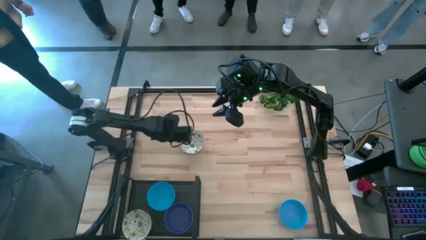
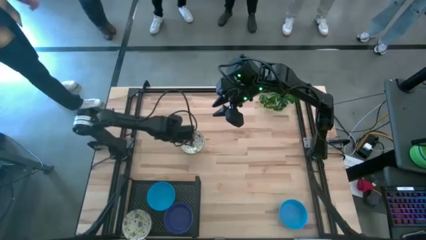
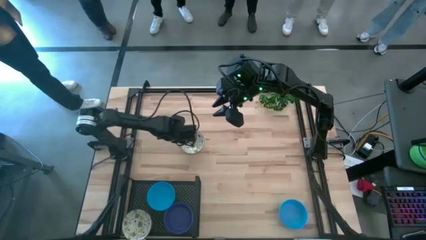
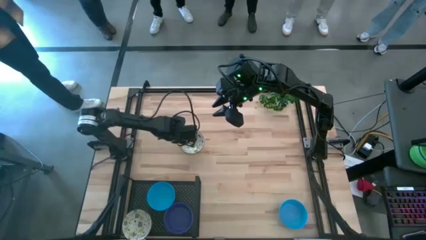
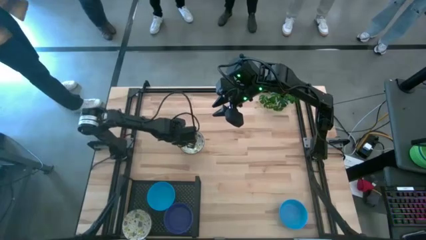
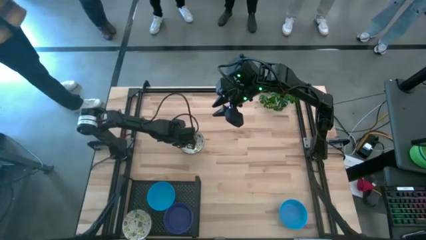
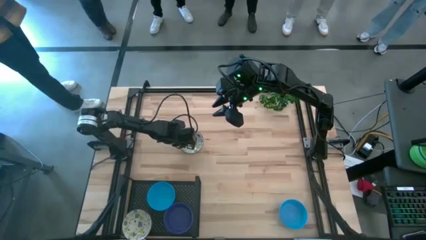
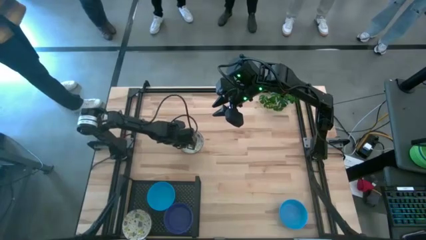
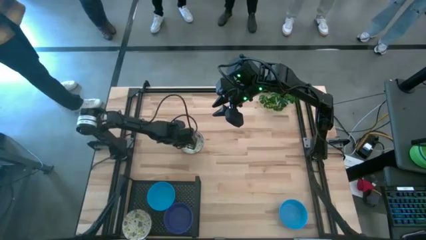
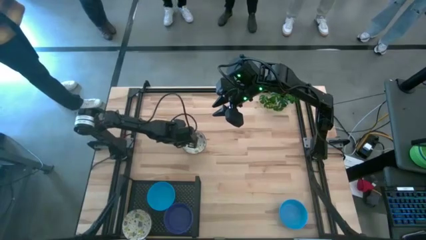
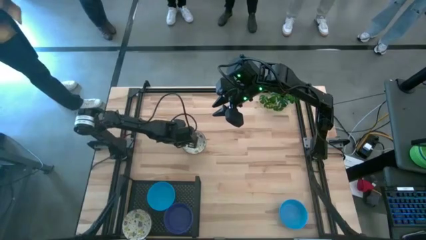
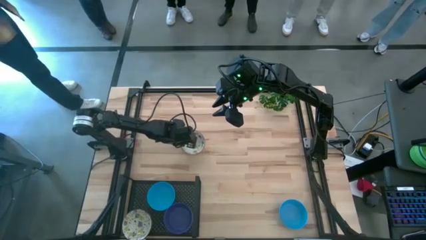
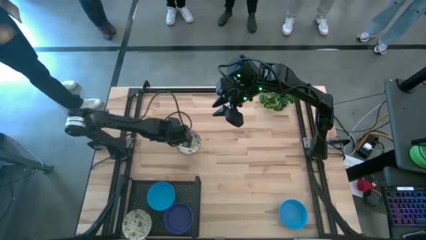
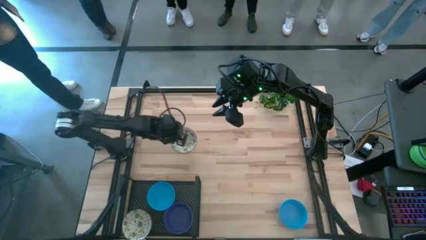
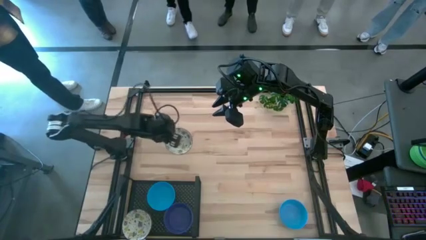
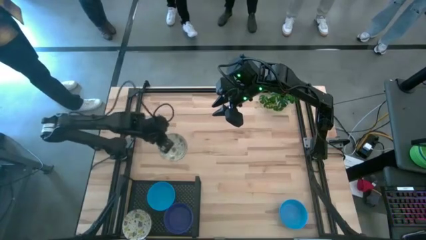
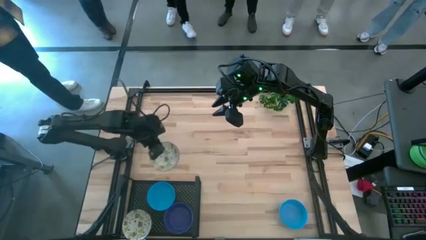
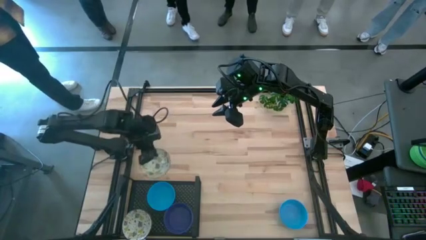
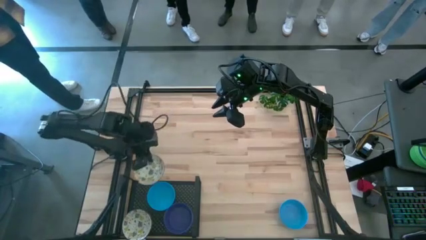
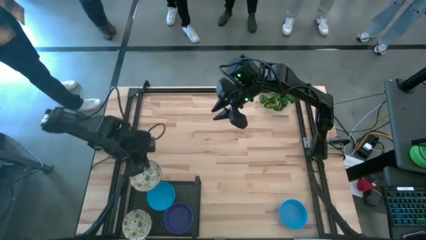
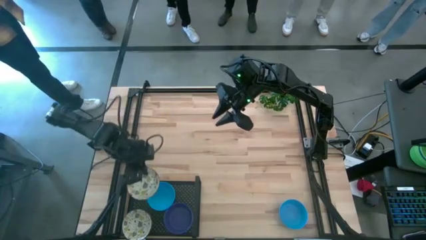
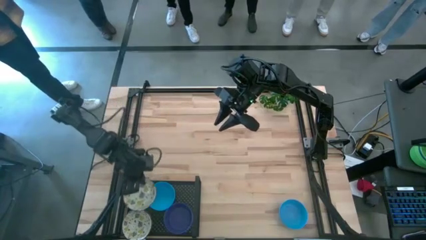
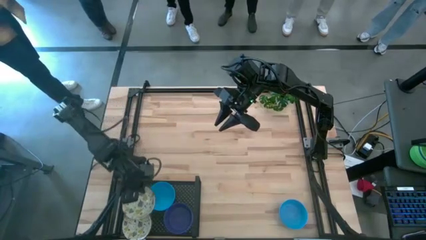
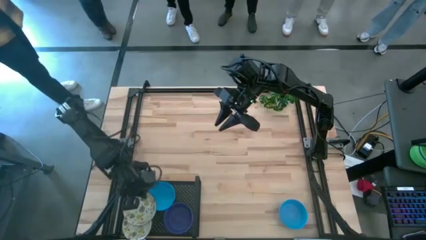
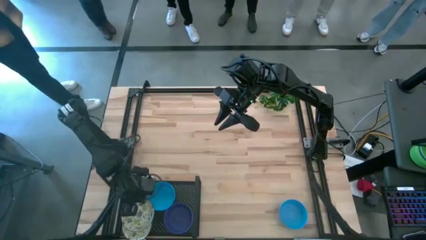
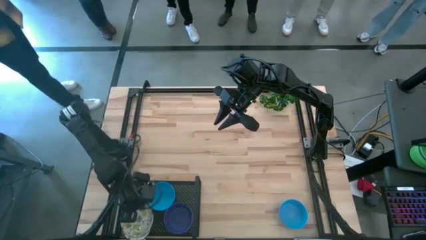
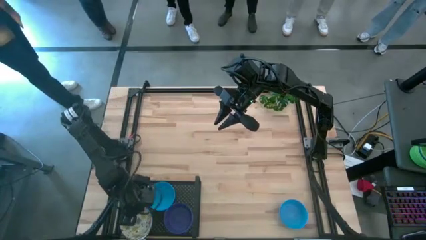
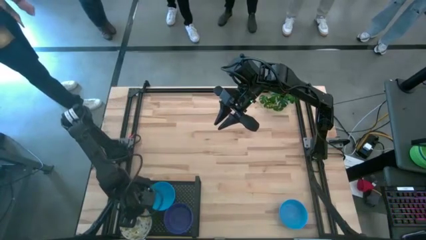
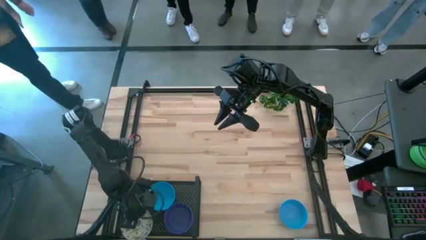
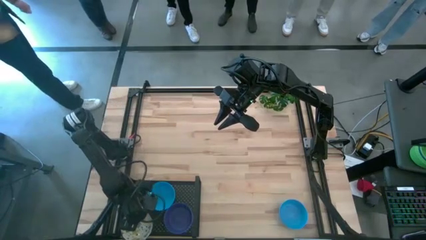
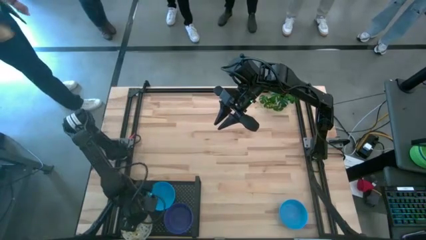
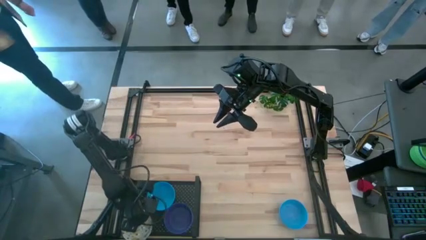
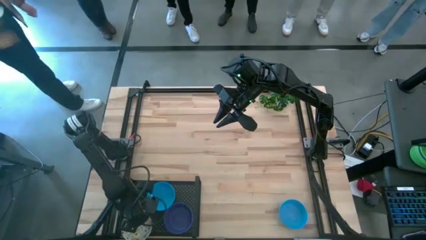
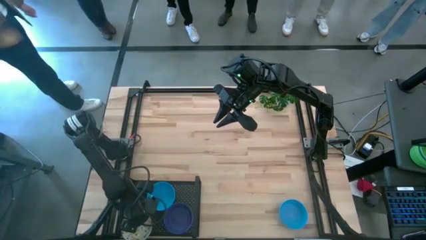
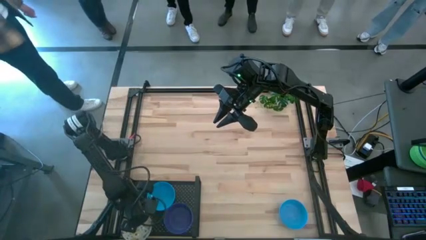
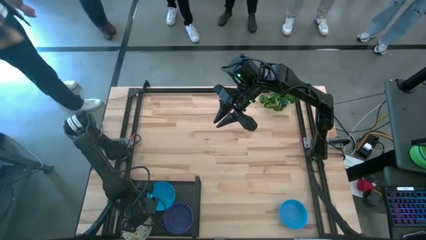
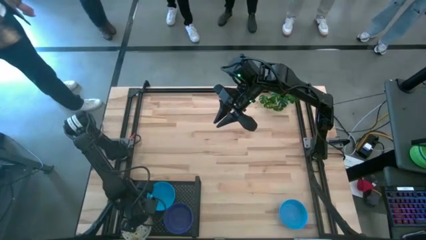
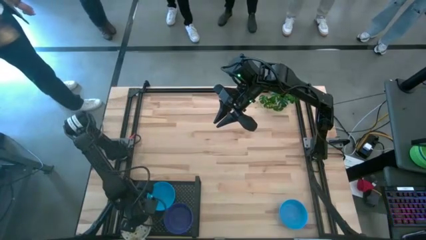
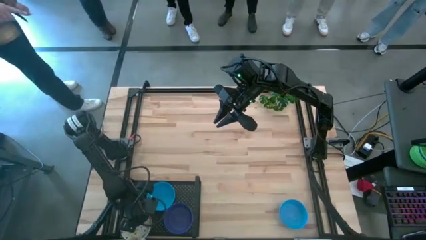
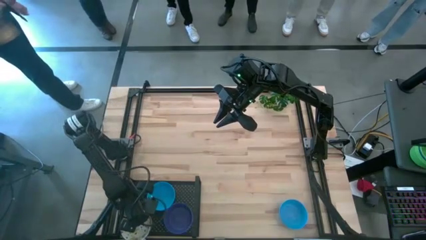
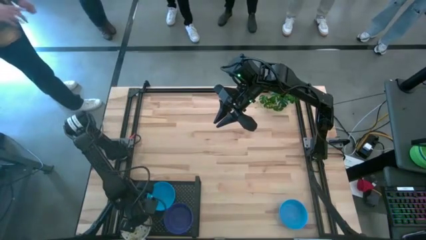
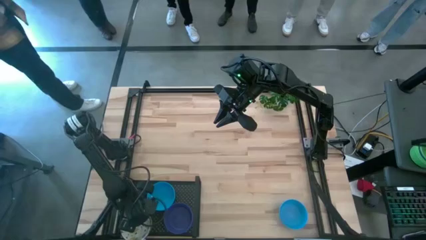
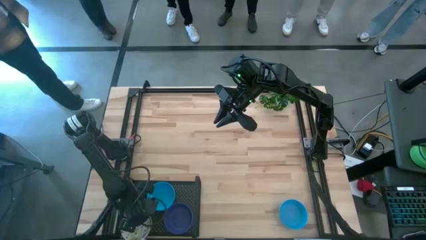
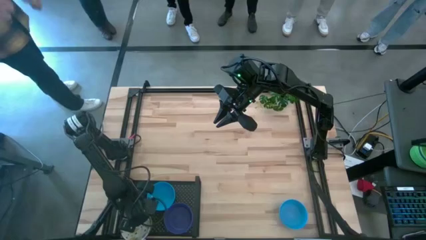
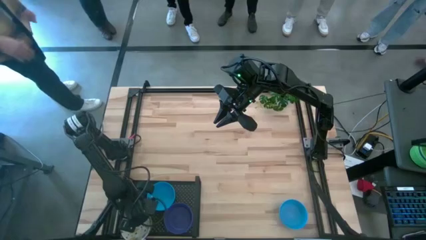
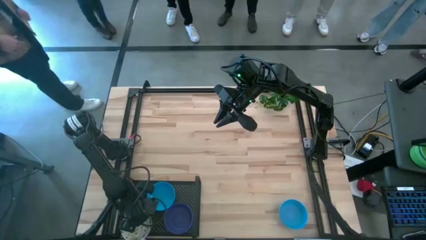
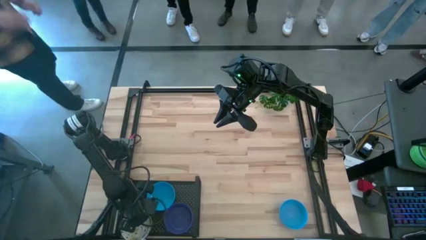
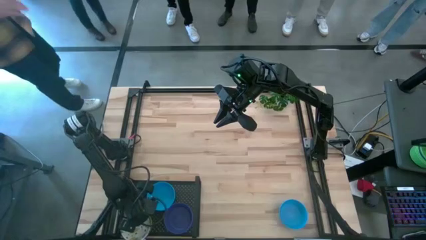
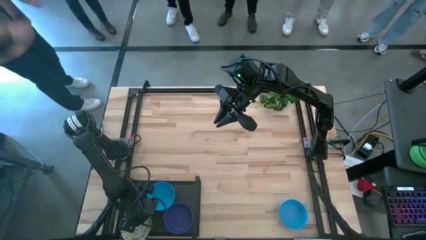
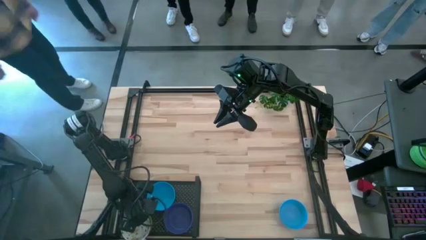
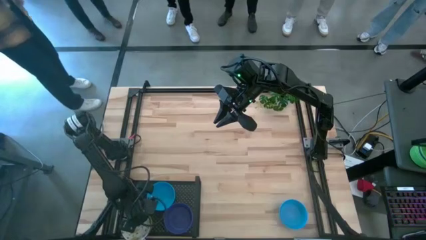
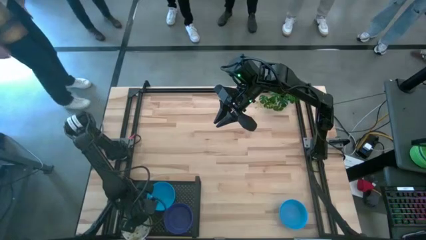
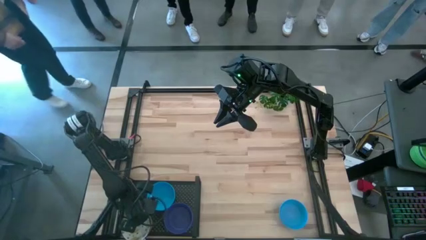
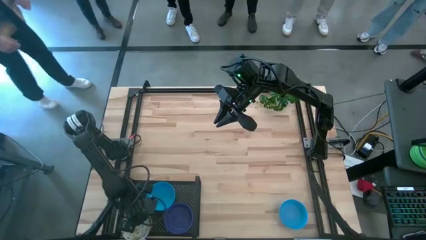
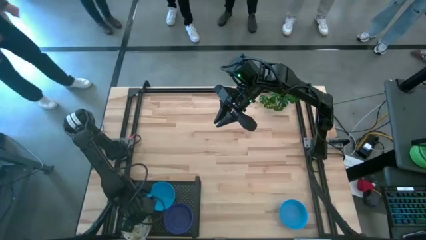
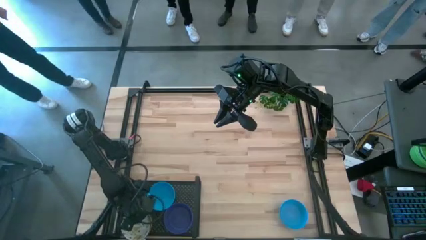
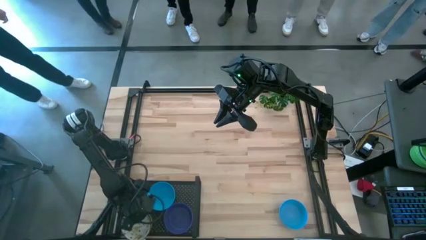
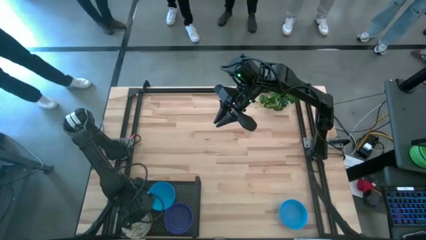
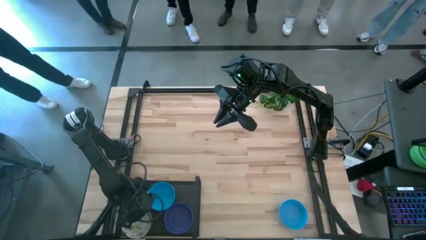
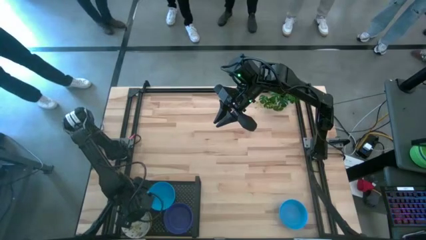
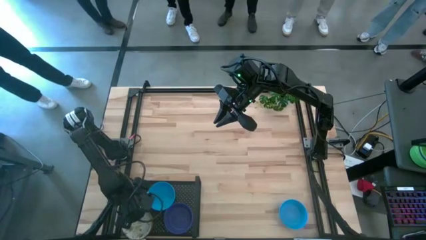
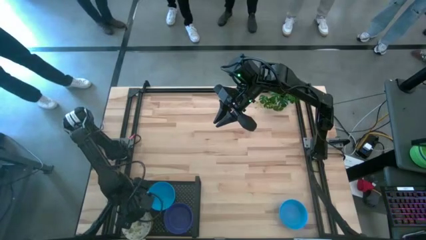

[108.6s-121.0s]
Task: Pick & Place Mini bowls
Stack the yellow patterned bowl on the yellow patterned bowl on the shelf

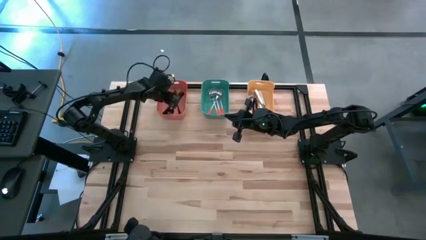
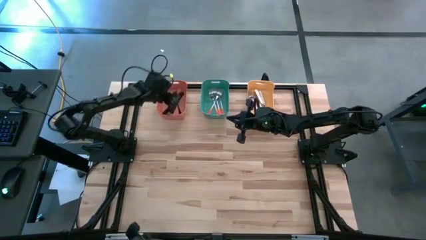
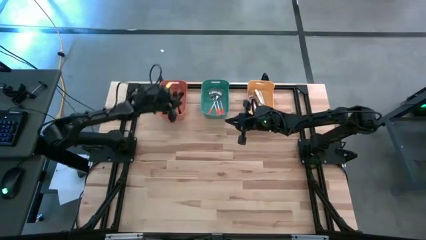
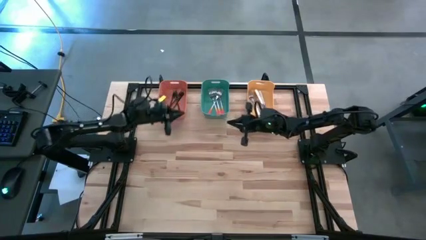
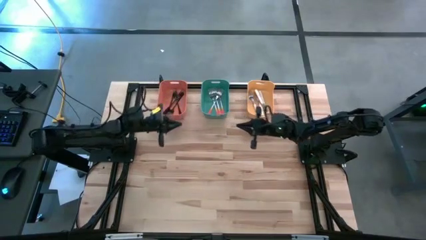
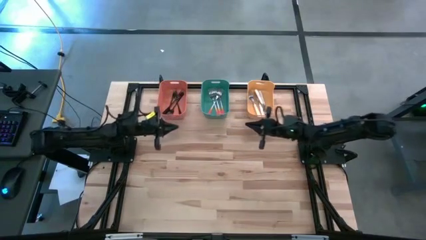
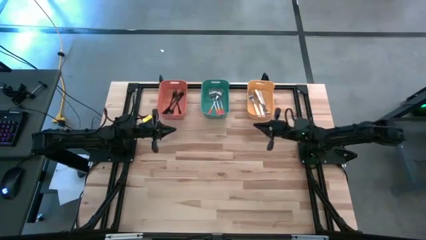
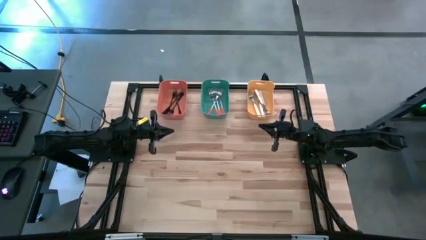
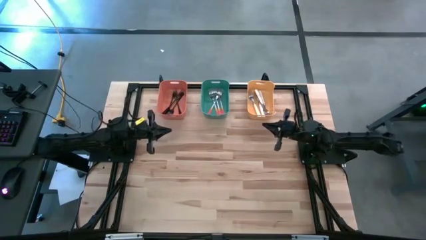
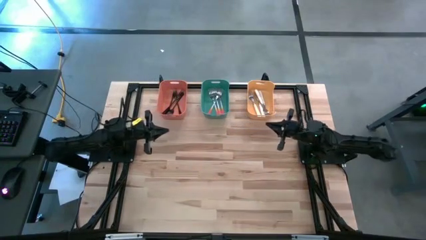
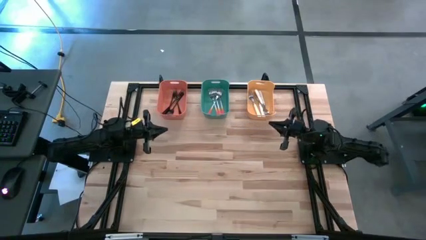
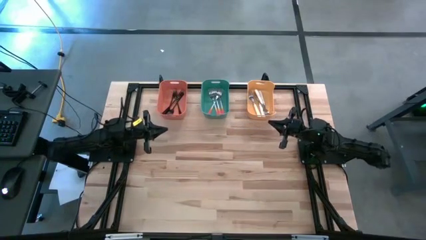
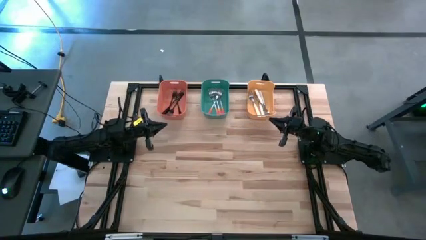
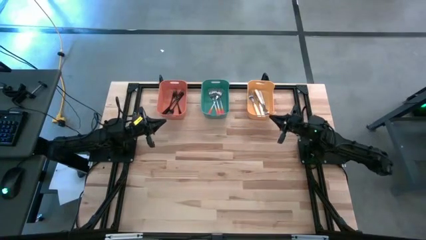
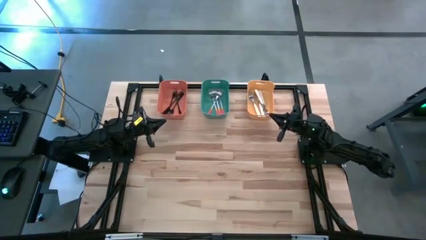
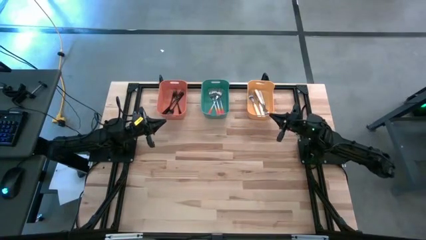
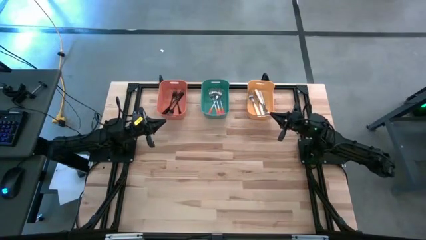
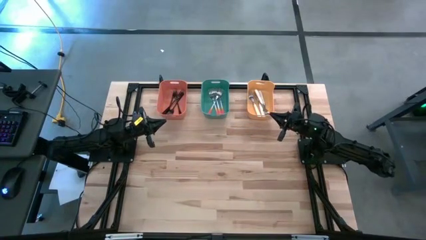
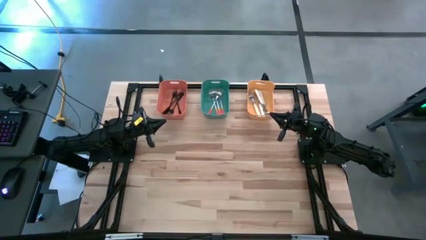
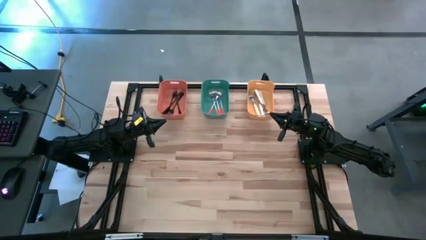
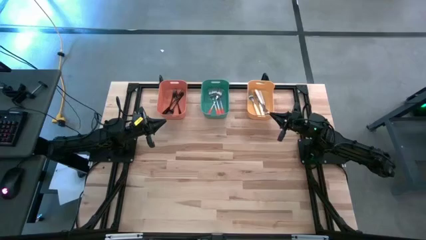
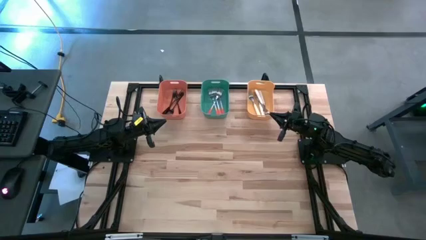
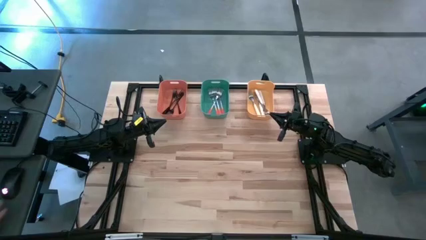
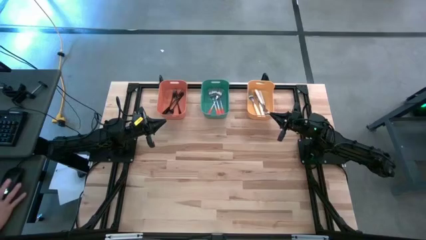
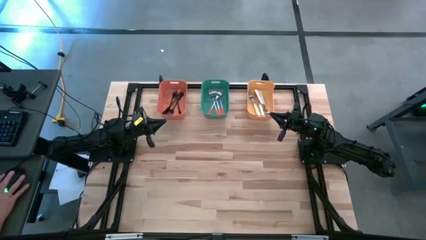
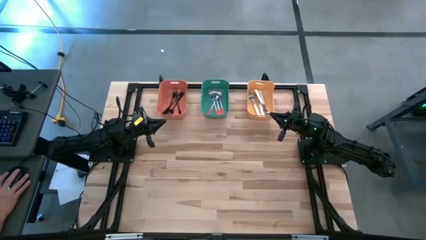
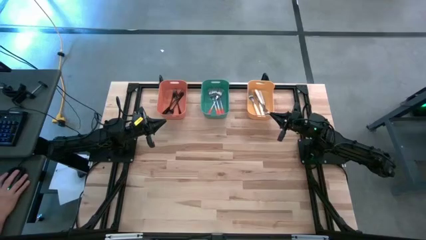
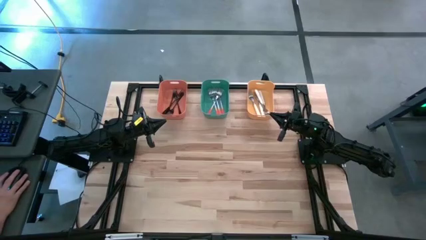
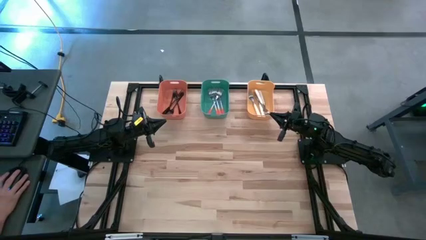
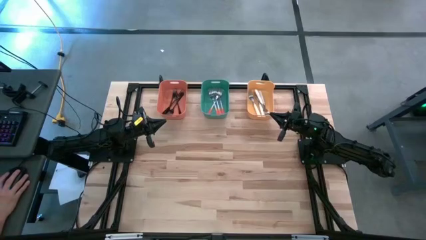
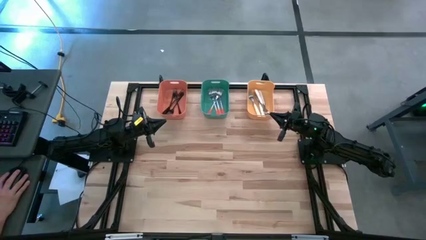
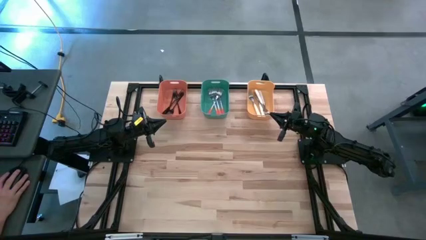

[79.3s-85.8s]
Task: Sort silverware by color (type)
Return to Home Position
